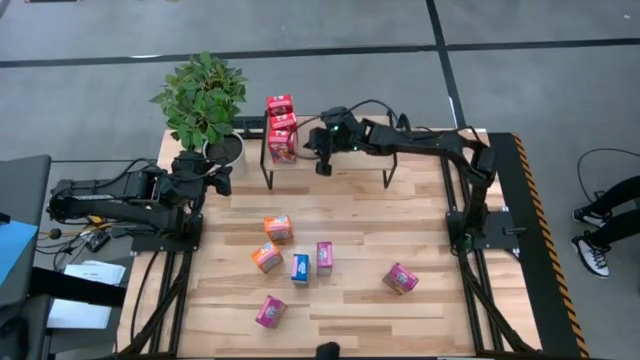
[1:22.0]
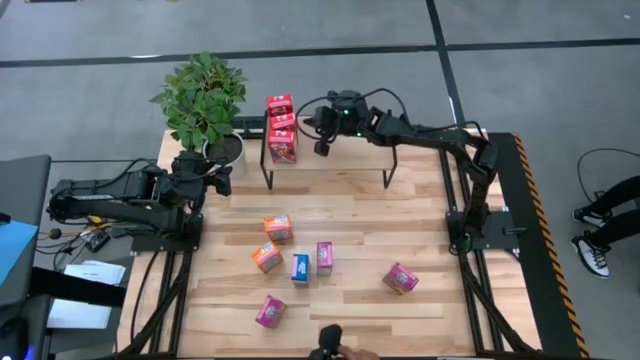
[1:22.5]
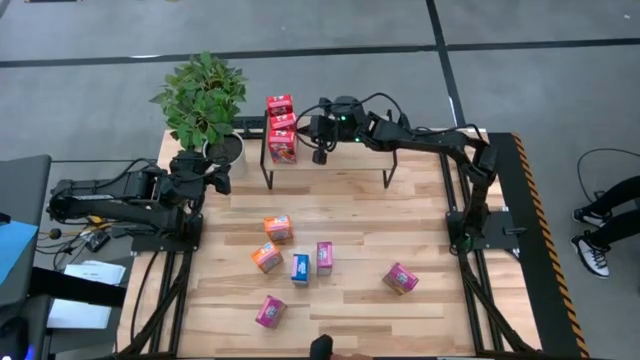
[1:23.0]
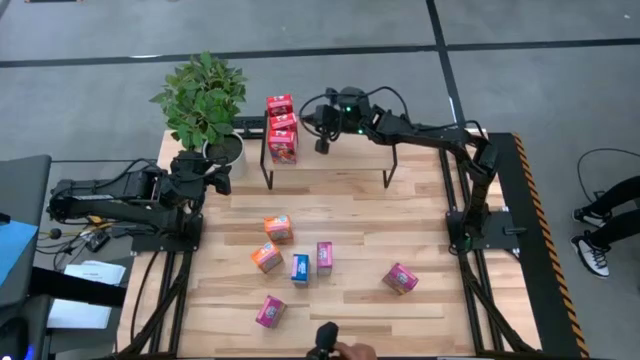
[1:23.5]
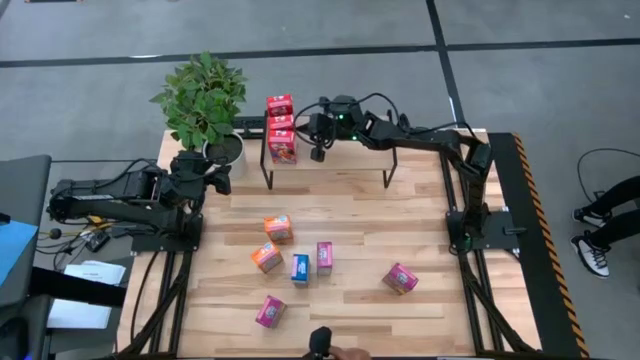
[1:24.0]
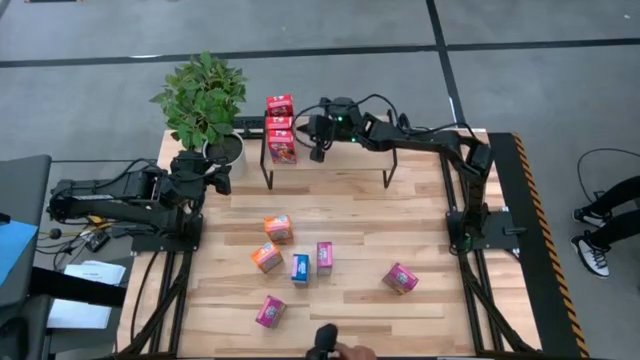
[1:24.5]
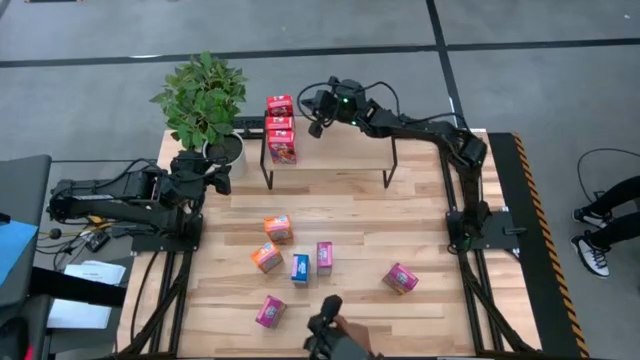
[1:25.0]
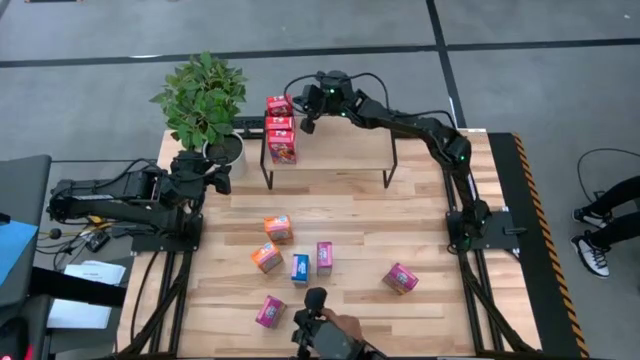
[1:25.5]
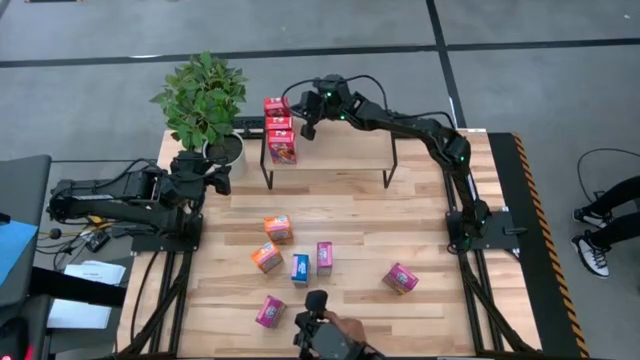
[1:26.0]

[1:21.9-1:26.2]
Task: Stack cereal on shelf
Adjust the red cereal boxes on the shelf

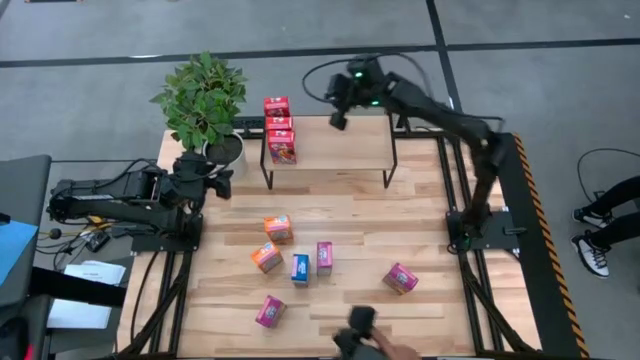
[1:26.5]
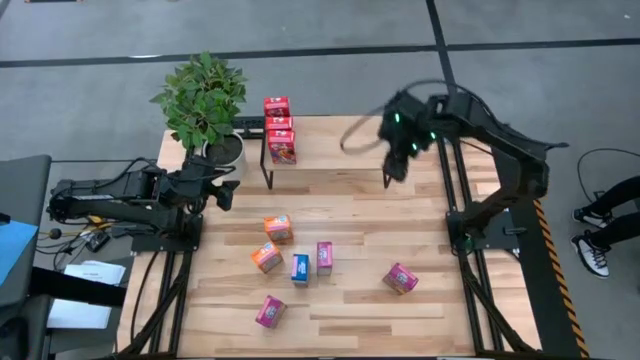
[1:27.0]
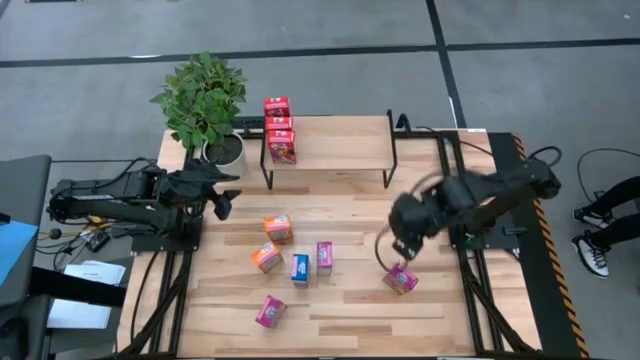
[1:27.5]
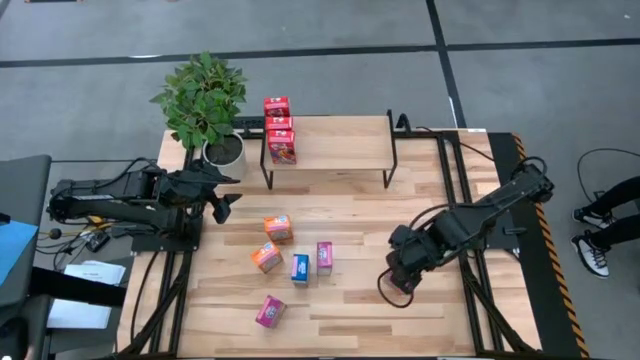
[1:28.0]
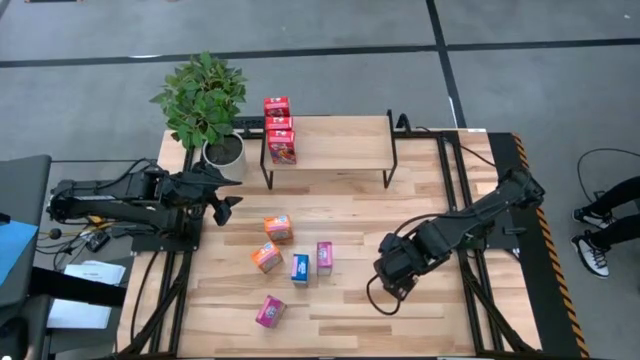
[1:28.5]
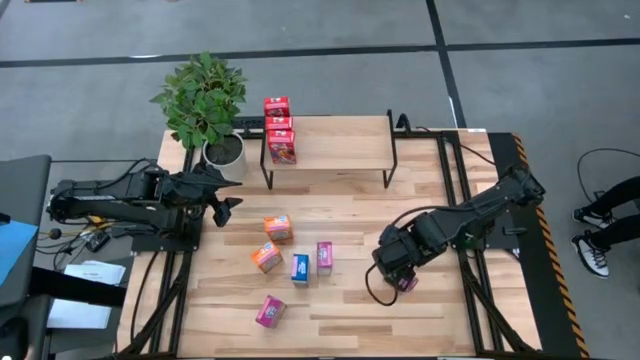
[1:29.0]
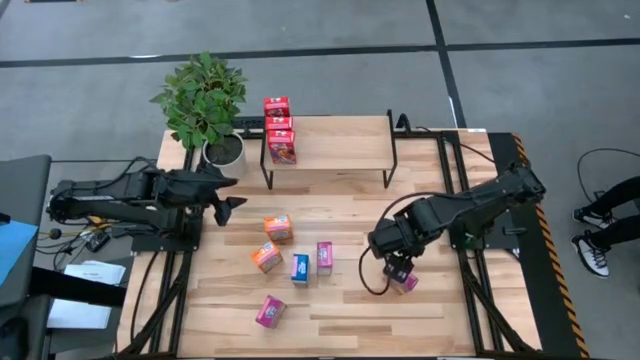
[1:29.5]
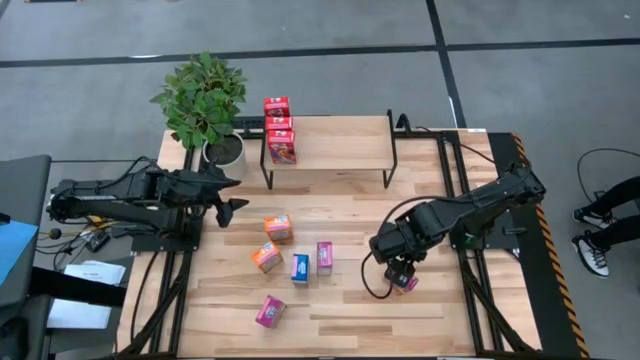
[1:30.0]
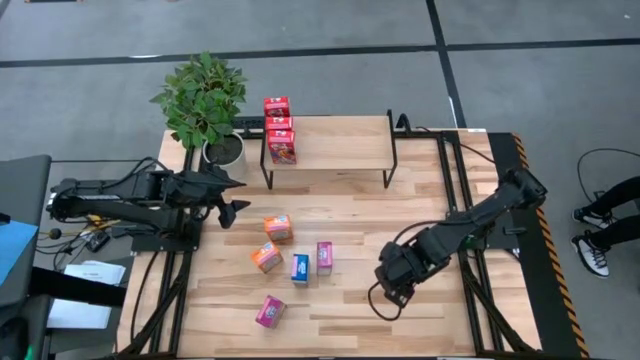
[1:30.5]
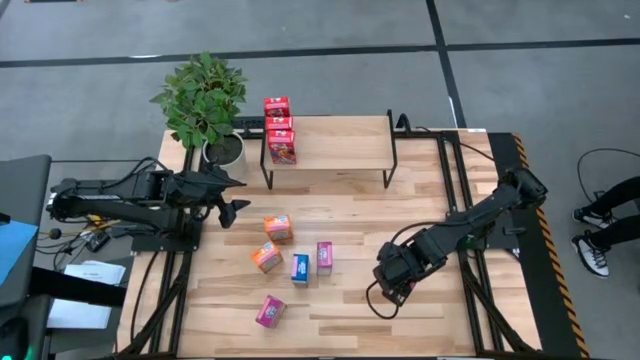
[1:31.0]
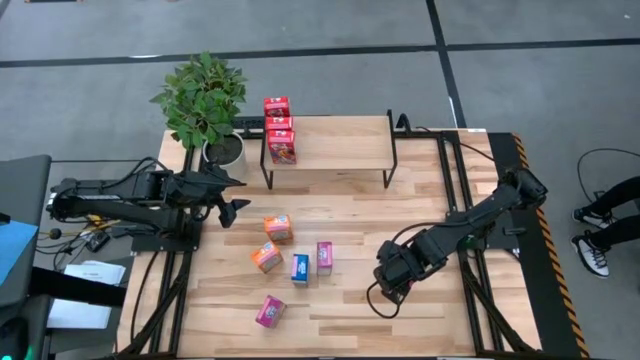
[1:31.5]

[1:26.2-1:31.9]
Put the right violet cereal box on the shelf

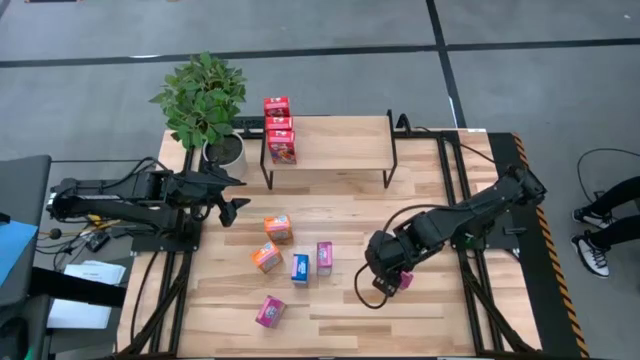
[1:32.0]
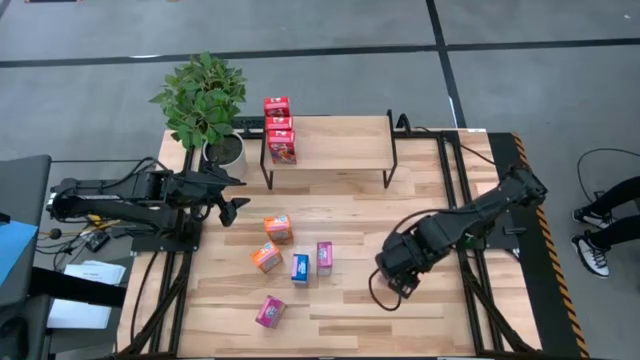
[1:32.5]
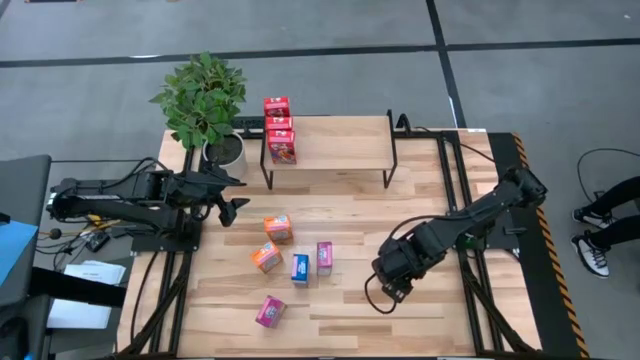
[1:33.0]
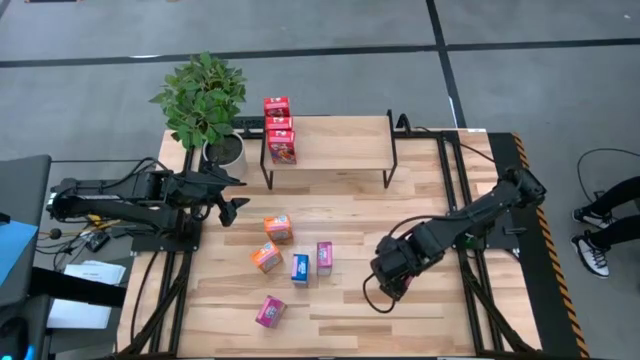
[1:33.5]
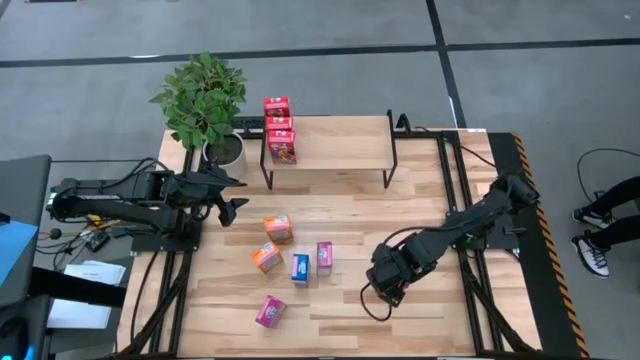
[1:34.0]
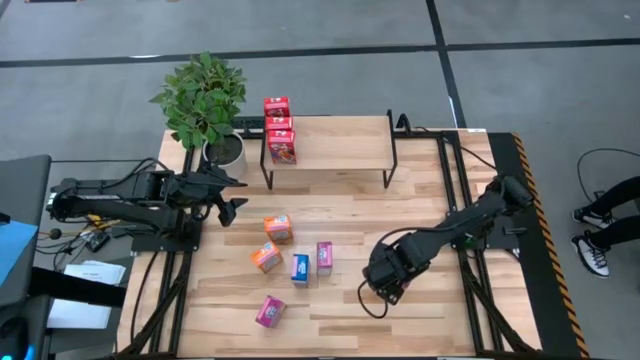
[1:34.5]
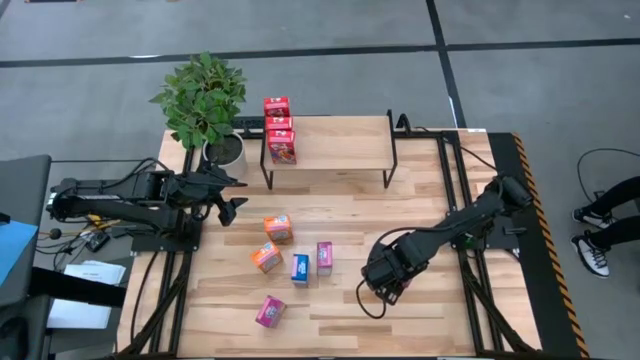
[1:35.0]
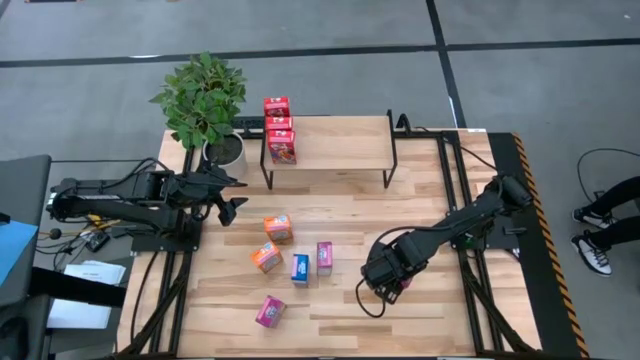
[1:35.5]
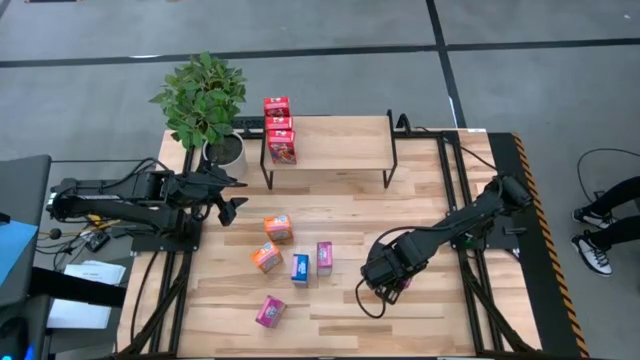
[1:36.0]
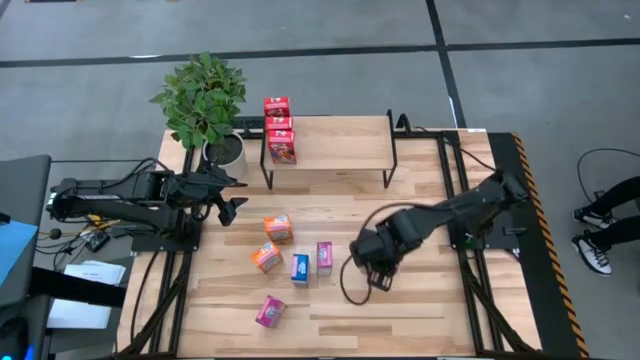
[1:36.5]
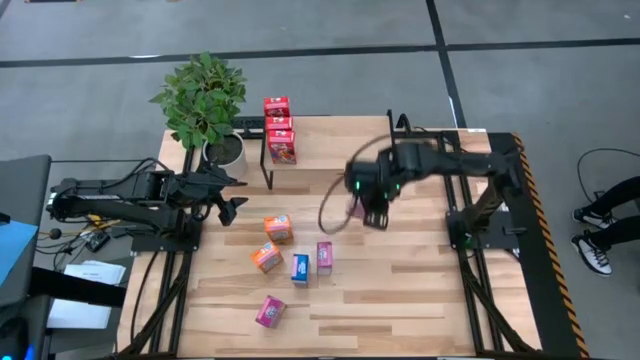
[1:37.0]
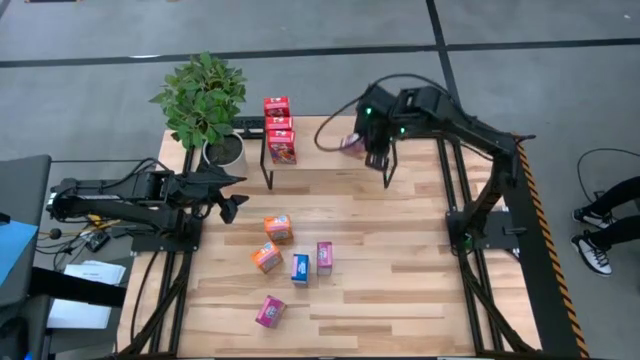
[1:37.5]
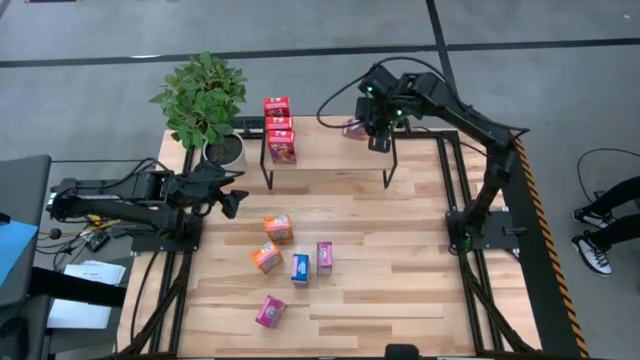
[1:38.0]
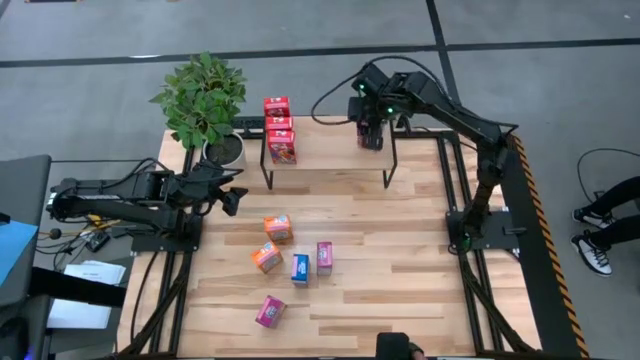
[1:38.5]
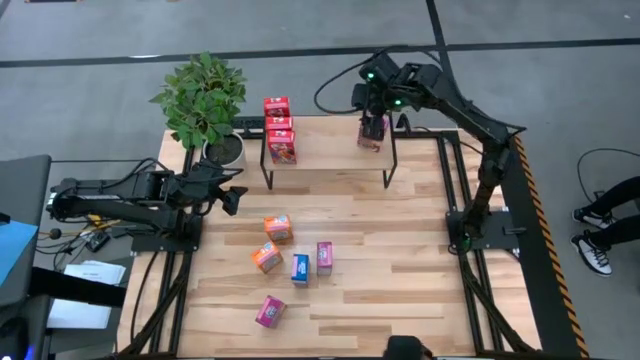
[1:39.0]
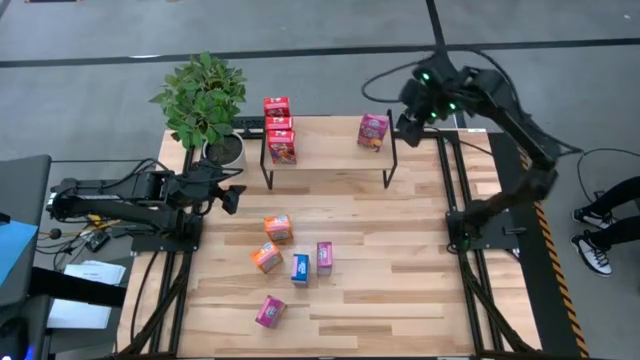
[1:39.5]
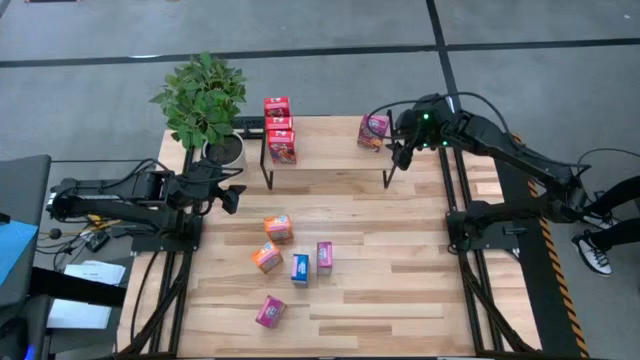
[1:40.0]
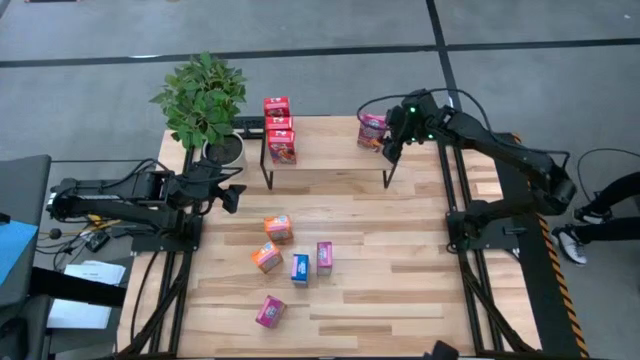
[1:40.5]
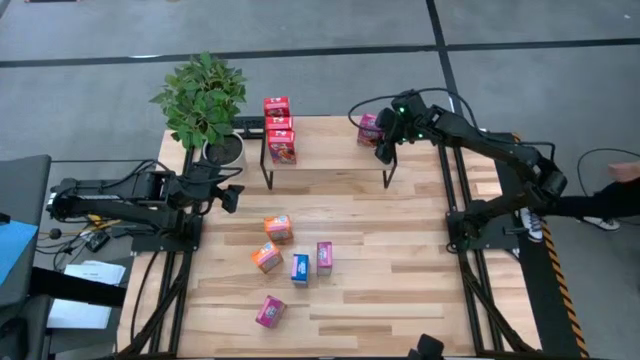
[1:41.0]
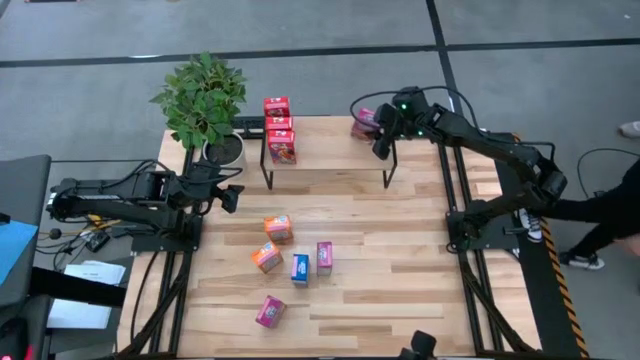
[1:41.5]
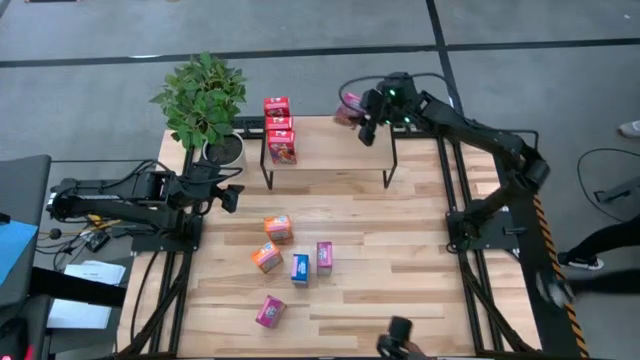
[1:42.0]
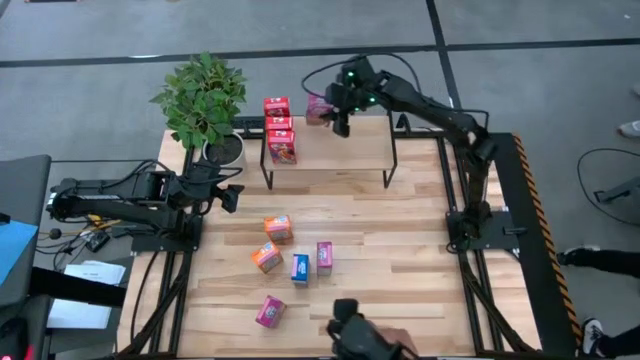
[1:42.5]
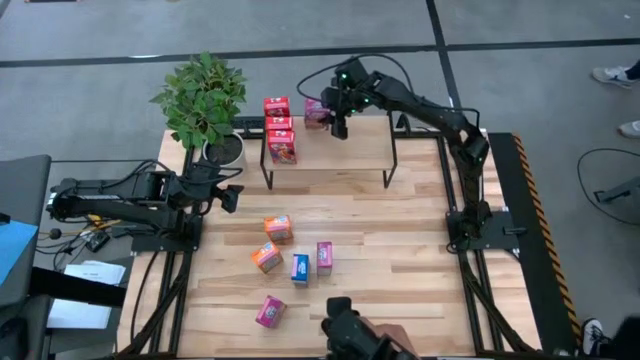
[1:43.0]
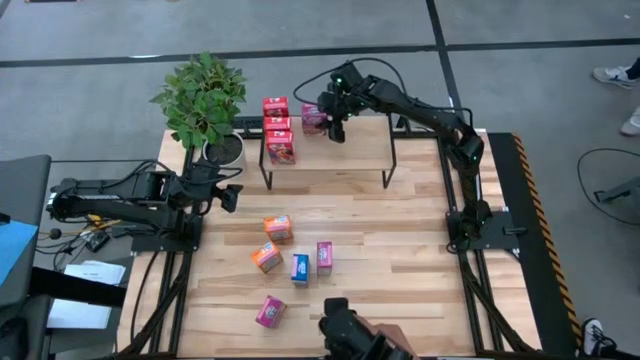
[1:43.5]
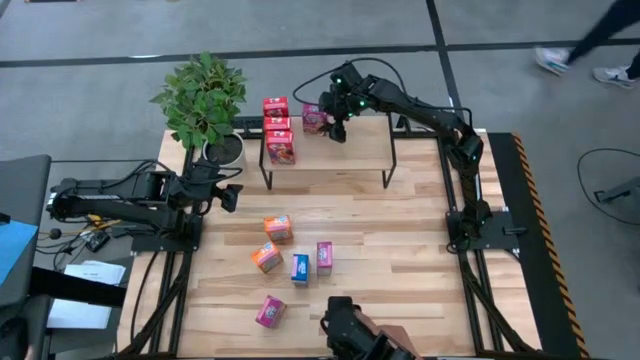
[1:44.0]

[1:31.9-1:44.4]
Put the right violet cereal box on the shelf
